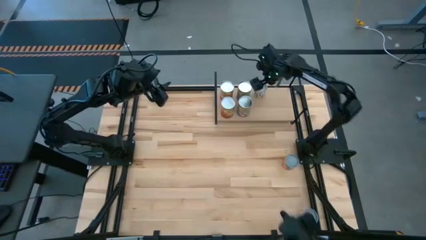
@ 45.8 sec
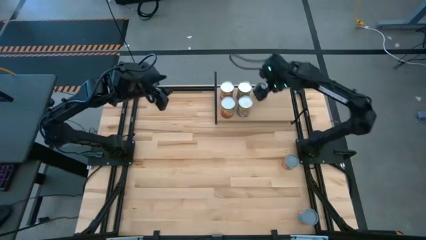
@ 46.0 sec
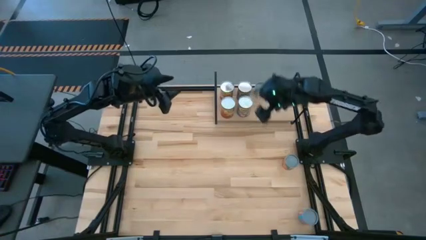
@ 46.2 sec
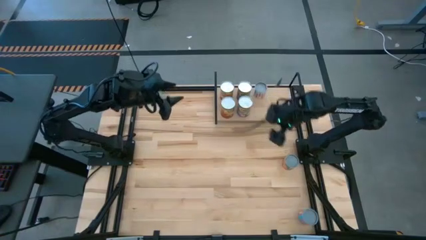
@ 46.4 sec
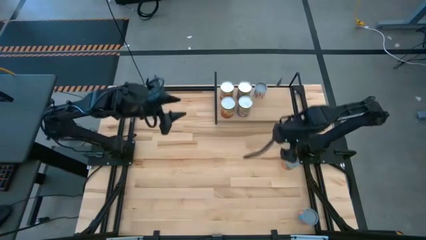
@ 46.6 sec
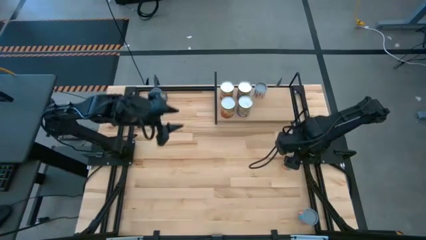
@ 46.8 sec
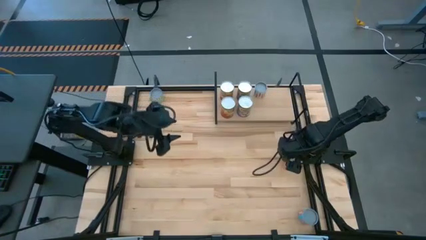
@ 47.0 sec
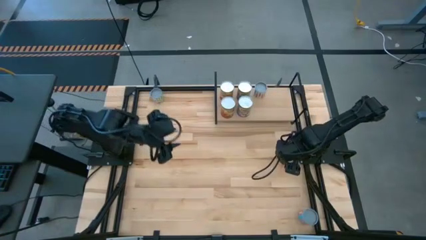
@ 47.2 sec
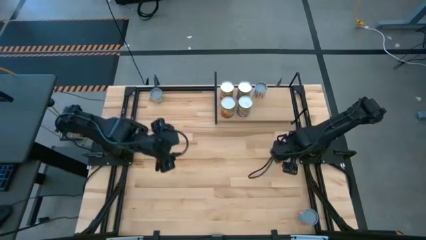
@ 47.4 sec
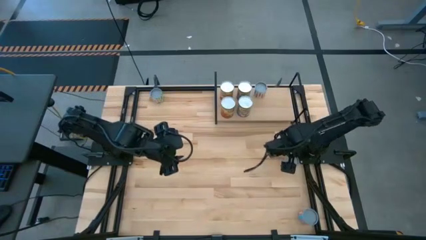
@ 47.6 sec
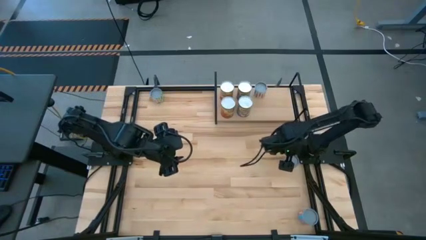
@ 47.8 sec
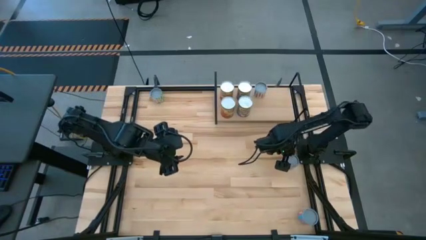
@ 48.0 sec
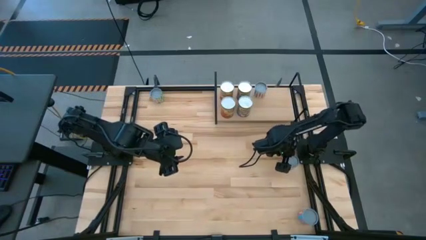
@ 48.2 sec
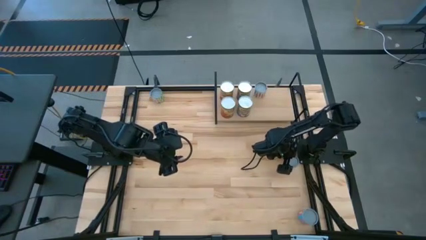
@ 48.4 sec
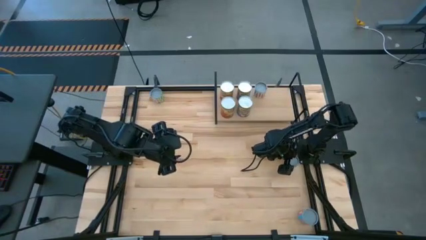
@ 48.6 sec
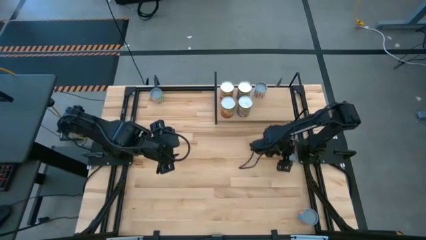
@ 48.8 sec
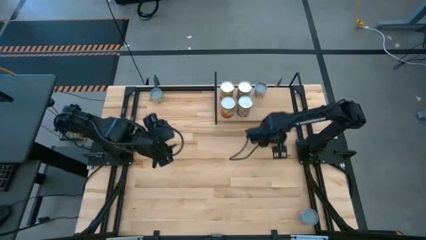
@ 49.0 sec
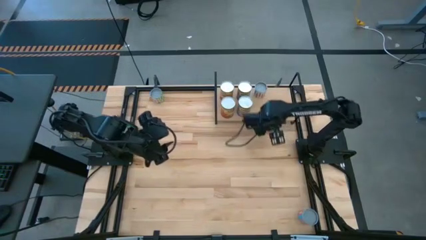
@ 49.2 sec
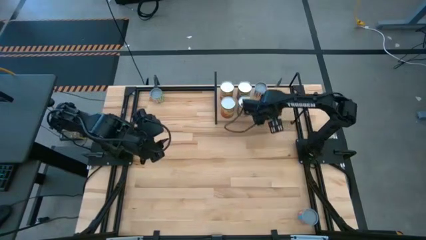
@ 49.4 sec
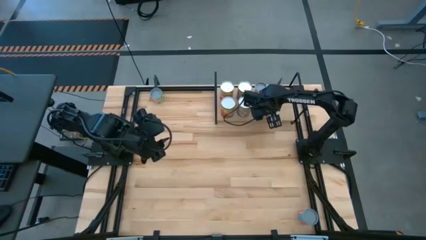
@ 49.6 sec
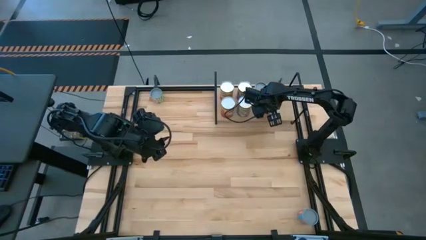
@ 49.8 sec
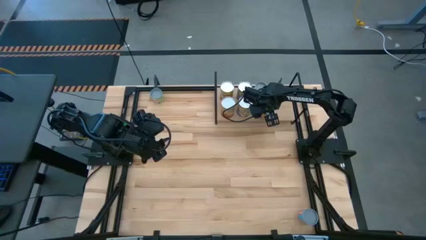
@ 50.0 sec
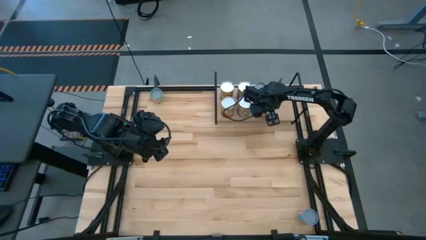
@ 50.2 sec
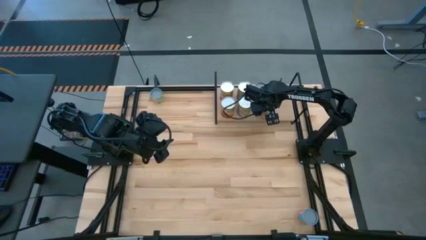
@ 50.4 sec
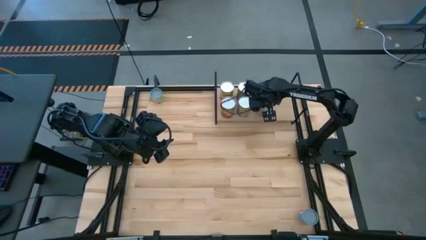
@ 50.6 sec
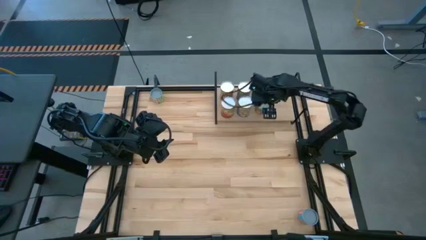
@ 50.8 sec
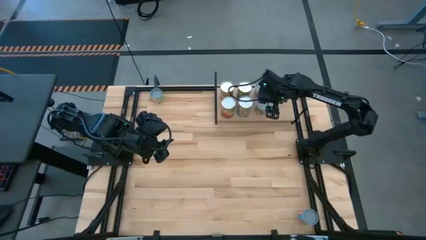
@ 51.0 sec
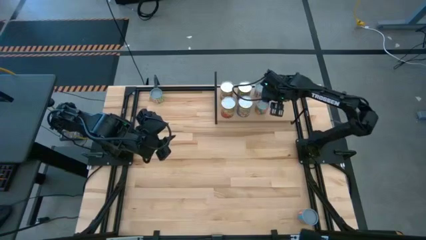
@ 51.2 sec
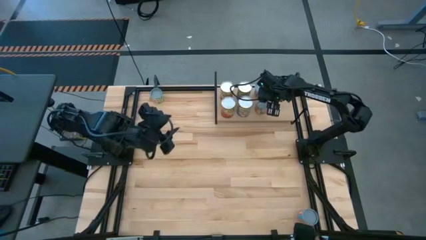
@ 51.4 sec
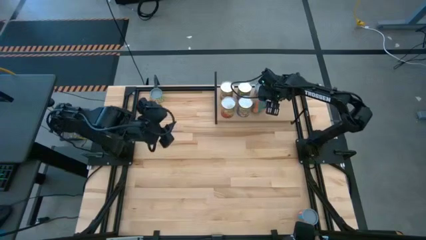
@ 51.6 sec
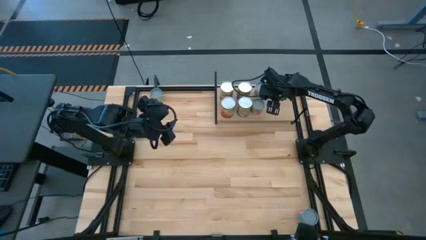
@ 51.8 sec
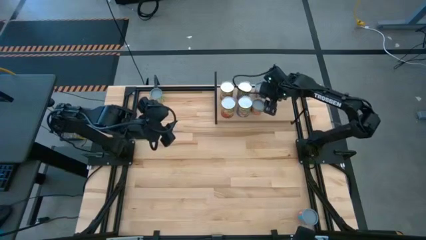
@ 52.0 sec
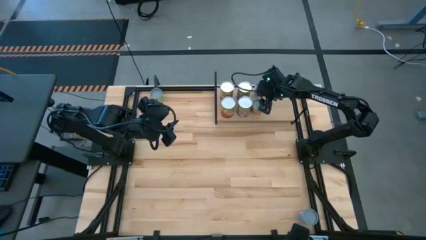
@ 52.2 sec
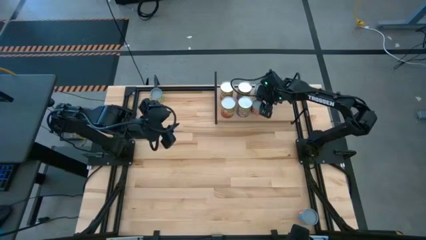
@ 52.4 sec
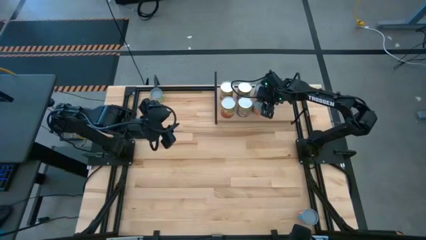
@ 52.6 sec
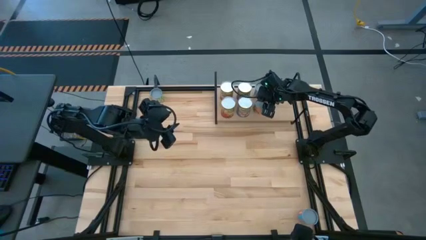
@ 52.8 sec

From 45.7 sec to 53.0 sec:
Task: Pick and place cans onto a shelf
Put the canned oranges on the shelf

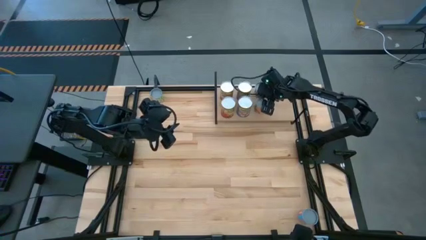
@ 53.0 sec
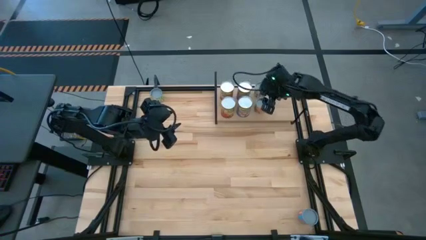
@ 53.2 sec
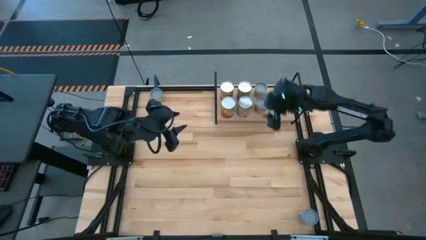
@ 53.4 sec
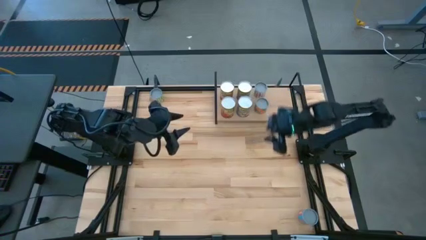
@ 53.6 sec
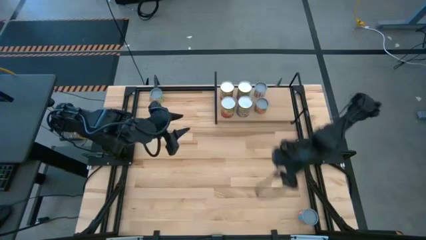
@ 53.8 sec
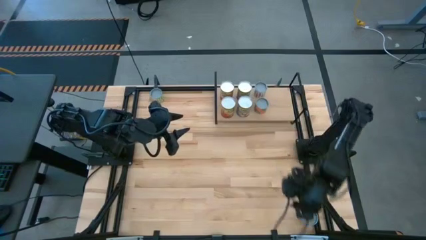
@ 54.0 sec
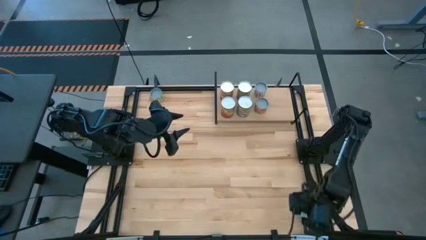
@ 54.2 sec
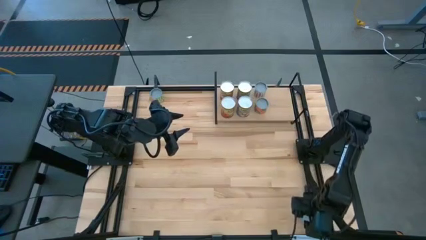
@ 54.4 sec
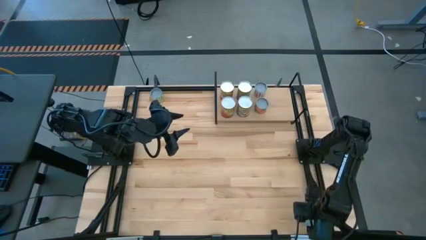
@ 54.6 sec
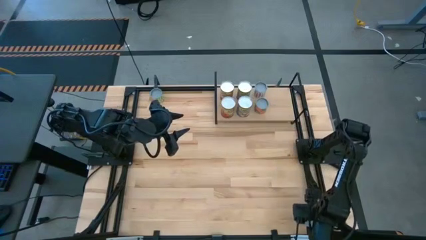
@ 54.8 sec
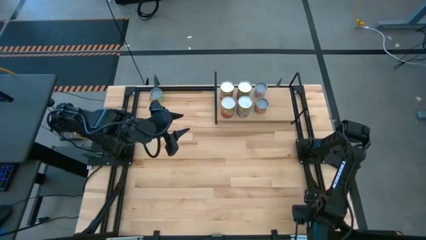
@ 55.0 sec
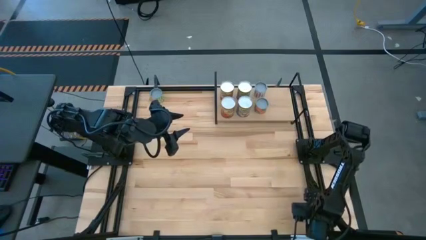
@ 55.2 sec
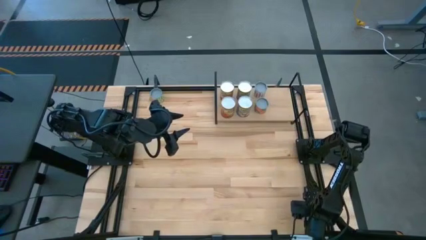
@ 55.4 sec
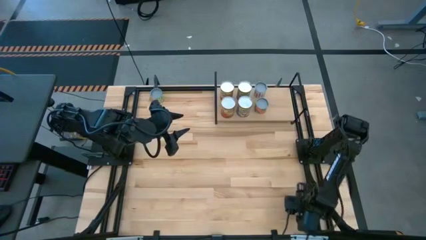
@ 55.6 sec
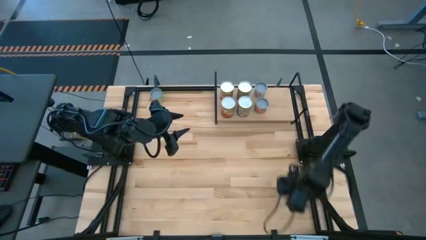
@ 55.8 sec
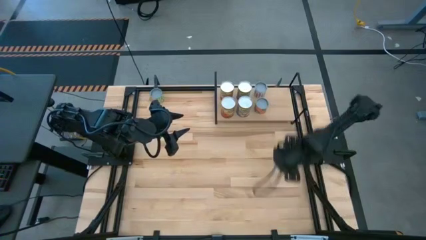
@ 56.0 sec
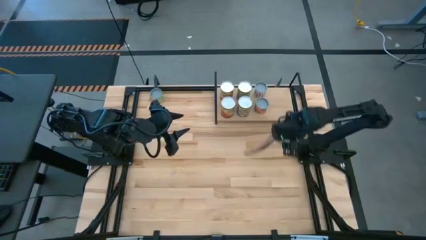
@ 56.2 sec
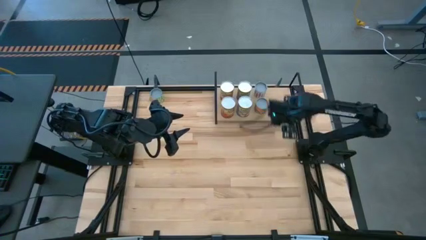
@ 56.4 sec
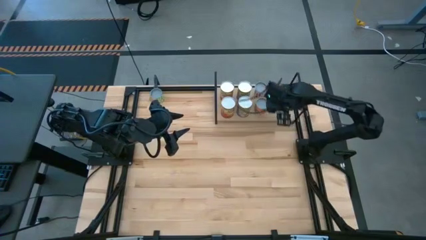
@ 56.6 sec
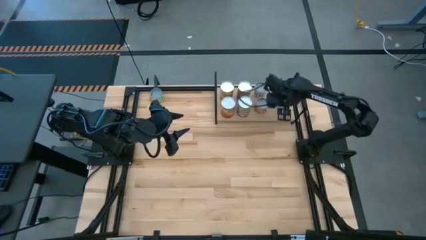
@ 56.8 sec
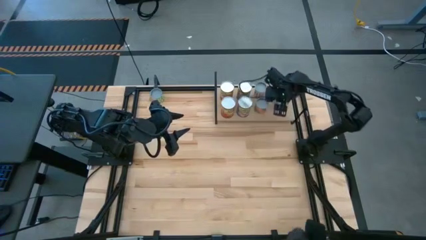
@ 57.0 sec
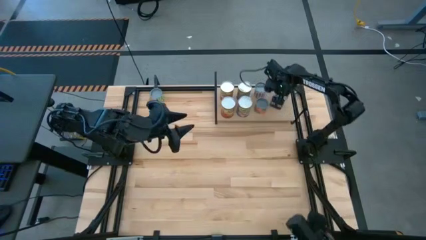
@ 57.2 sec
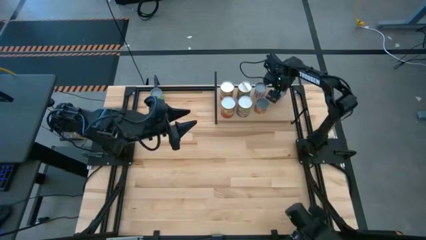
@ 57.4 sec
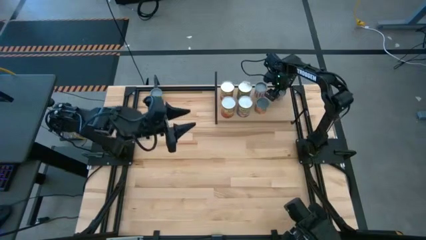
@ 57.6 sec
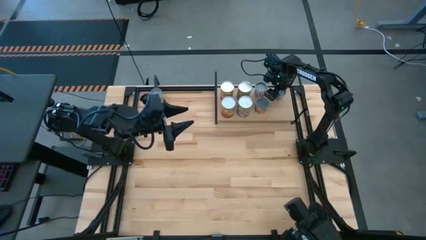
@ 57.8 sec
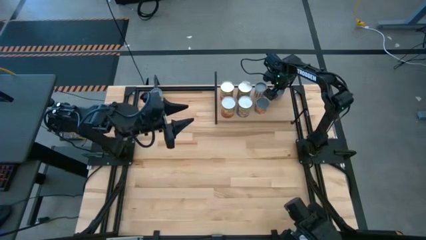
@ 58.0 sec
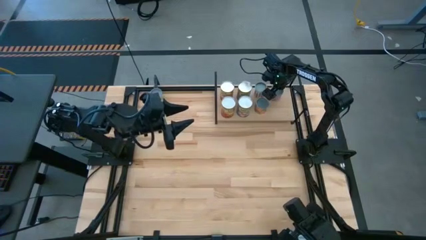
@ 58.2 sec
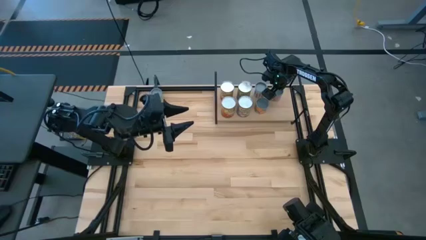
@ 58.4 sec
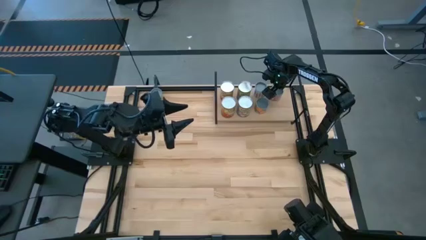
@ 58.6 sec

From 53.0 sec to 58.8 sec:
Put the small canned corn on the shelf
